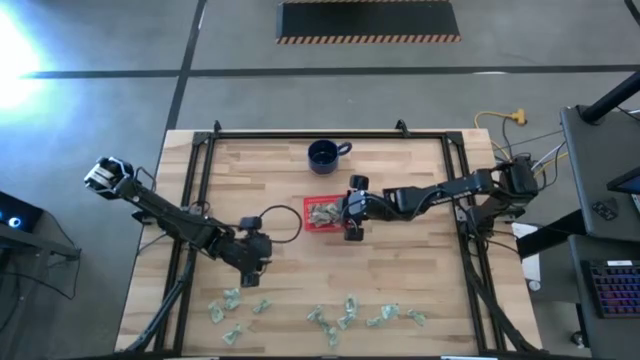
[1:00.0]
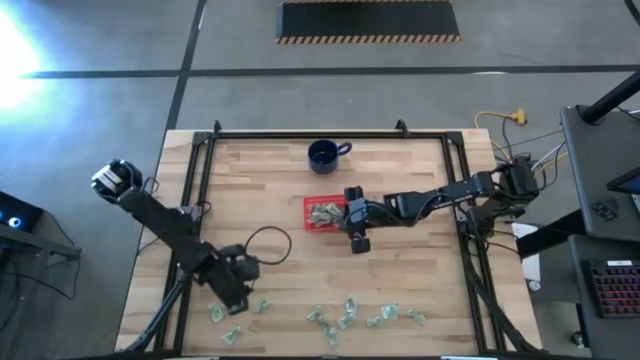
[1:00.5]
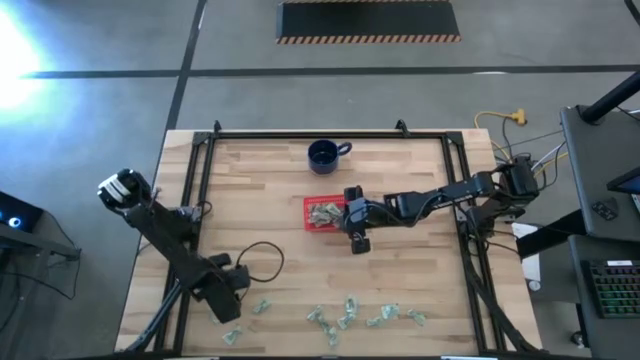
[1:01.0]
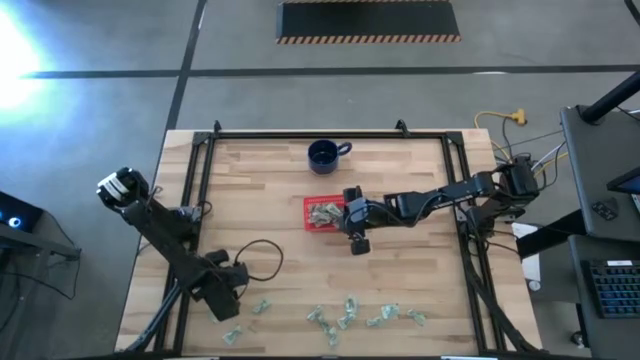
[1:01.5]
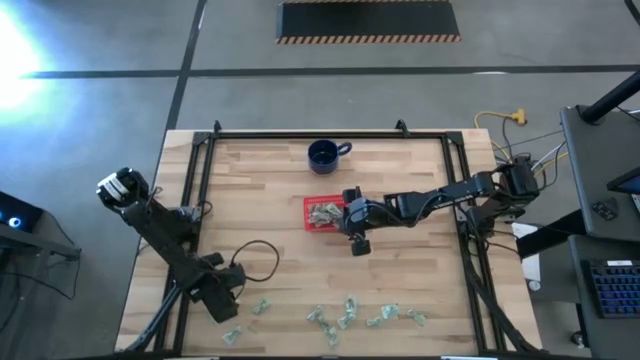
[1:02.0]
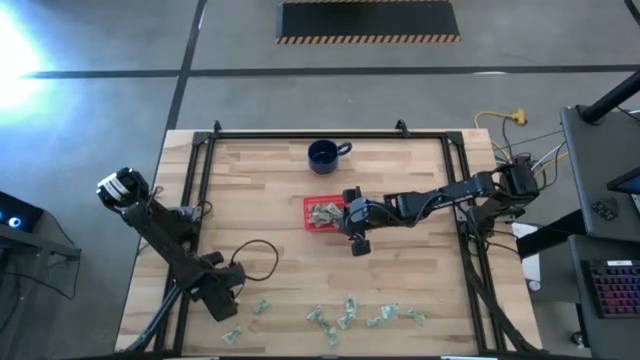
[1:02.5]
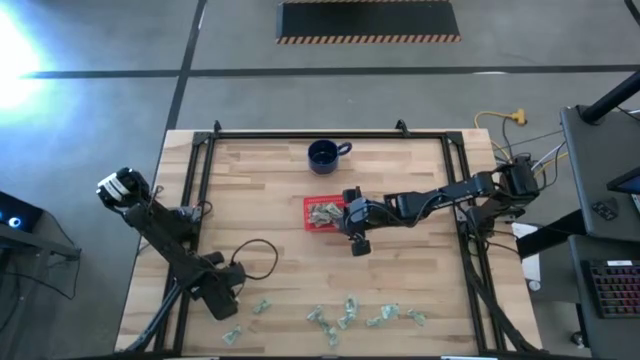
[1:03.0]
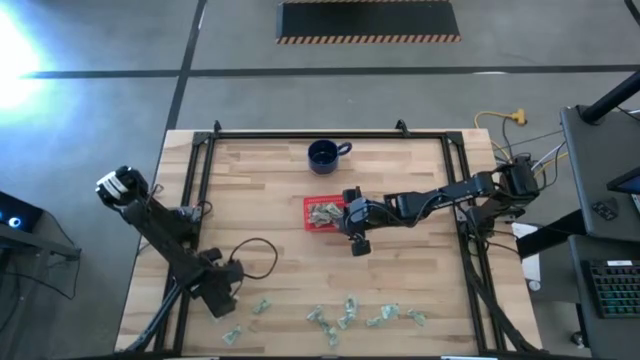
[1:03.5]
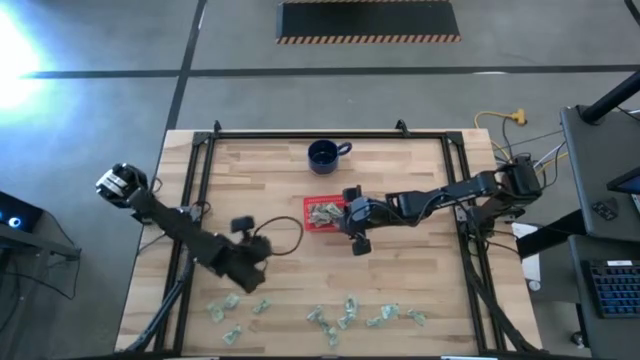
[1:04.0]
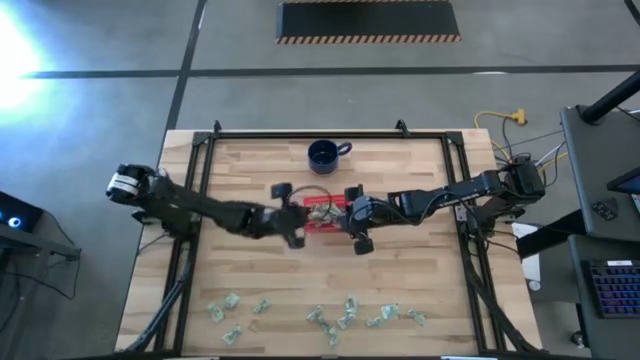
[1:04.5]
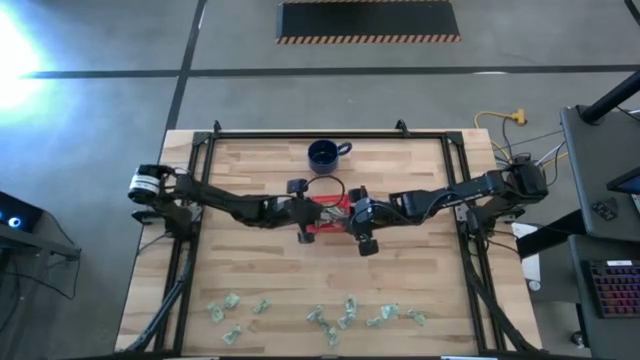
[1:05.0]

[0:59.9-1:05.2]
Task: Pick and place items into bin
Put the stevia packet into the red bin

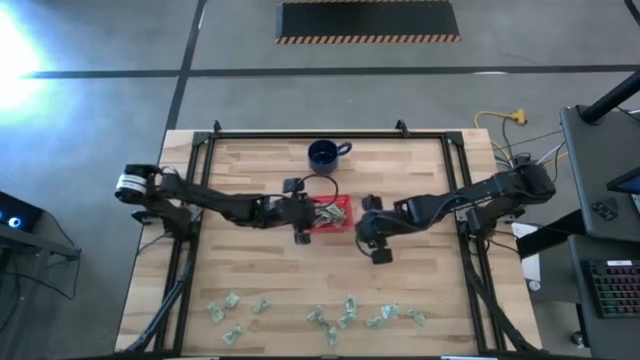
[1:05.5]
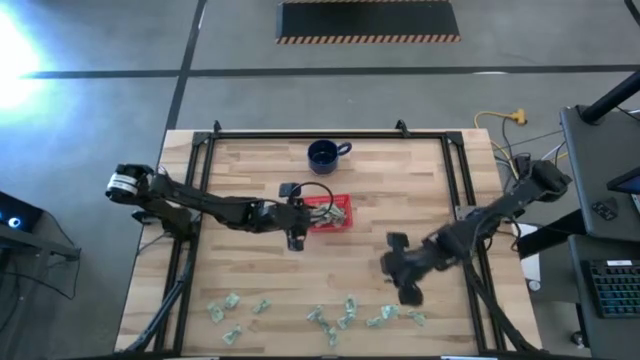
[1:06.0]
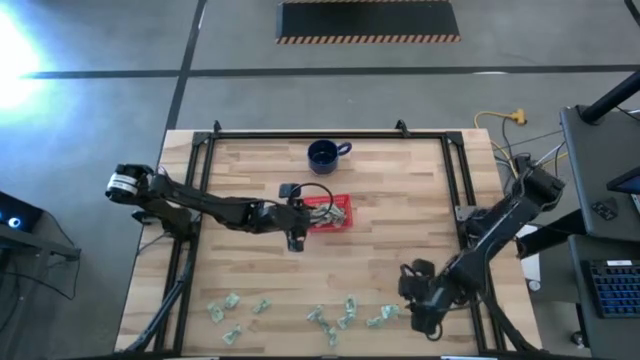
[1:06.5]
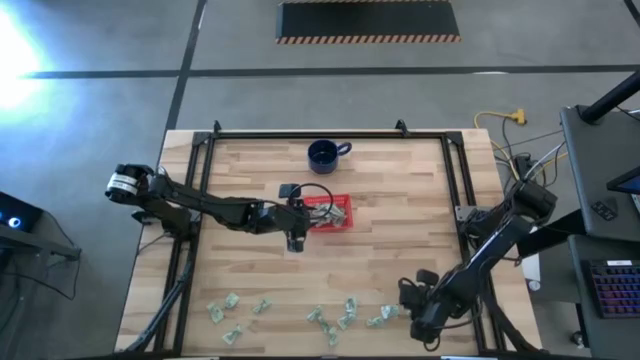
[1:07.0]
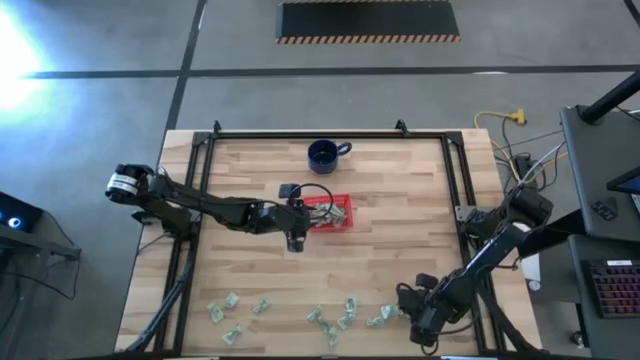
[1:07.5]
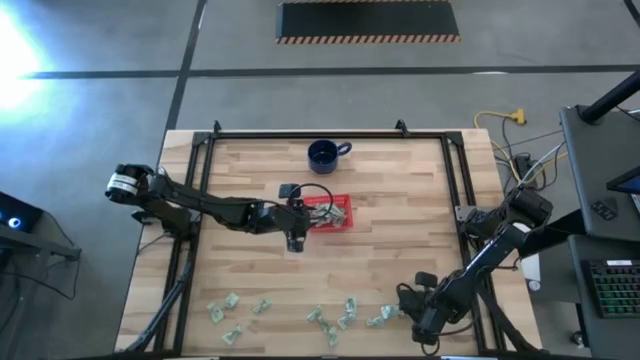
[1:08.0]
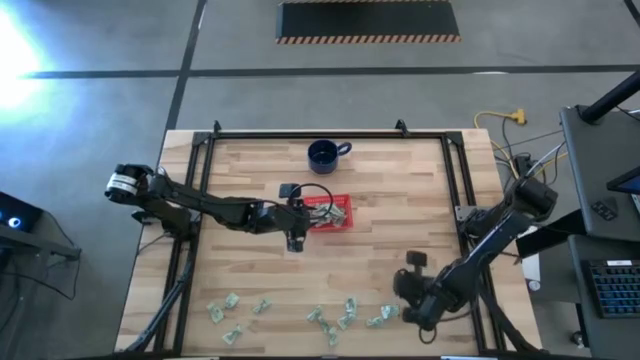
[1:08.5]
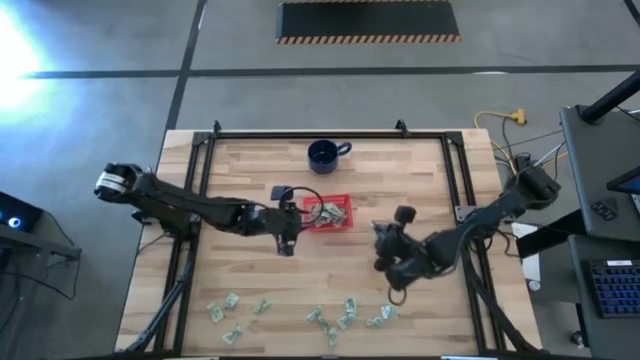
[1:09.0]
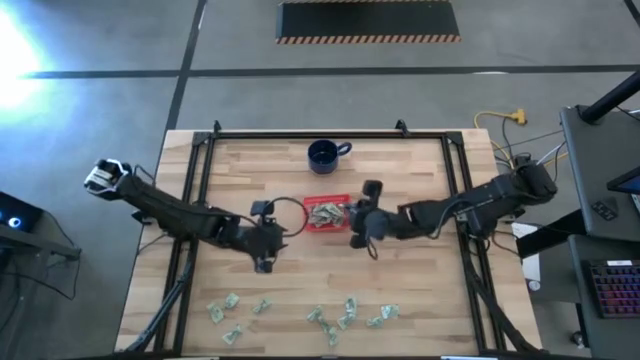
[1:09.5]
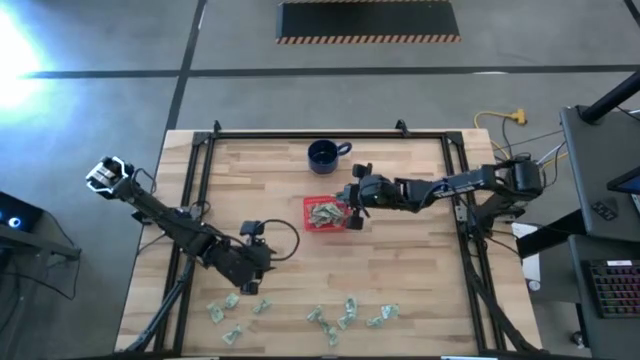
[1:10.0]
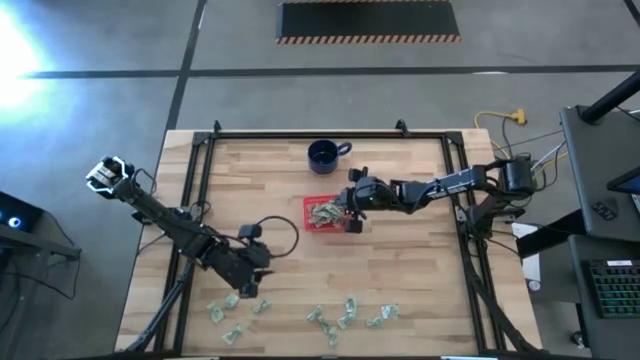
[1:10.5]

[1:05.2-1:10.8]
Put the stevia packet into the red bin

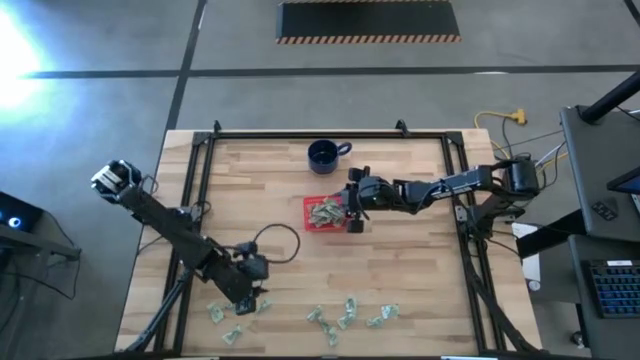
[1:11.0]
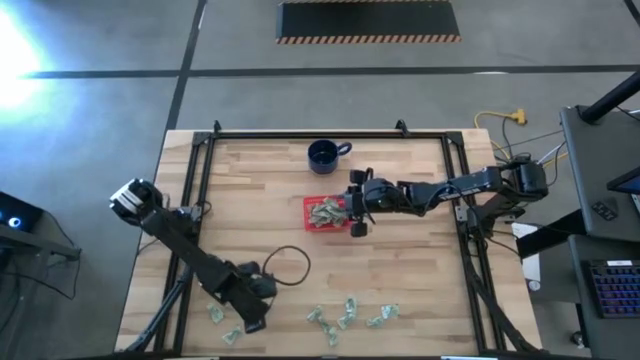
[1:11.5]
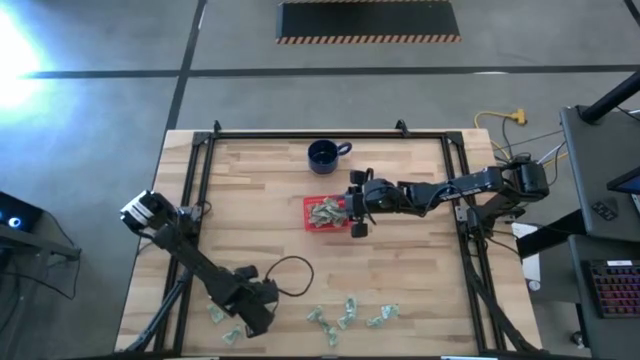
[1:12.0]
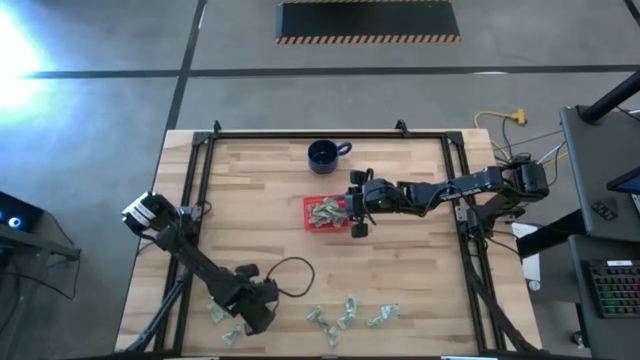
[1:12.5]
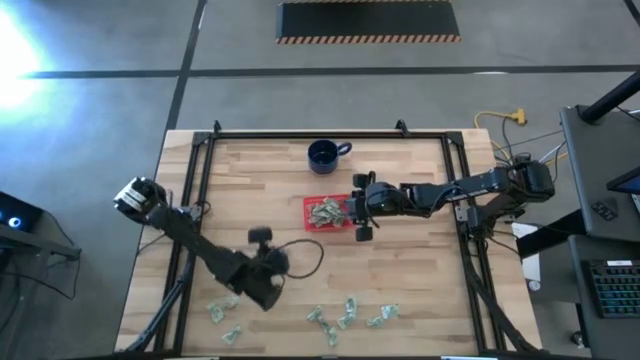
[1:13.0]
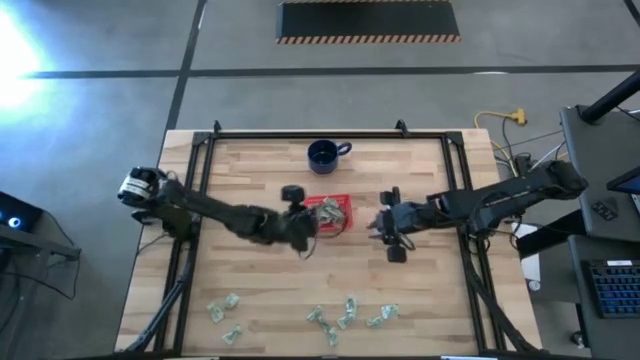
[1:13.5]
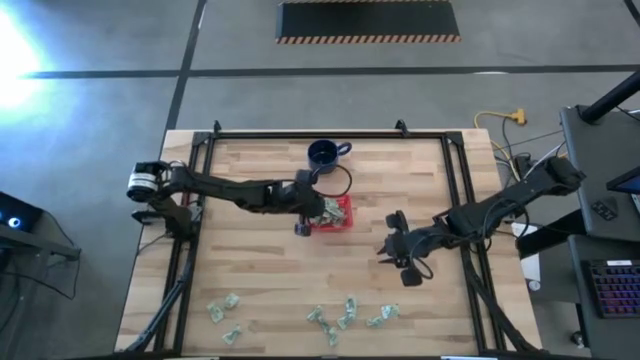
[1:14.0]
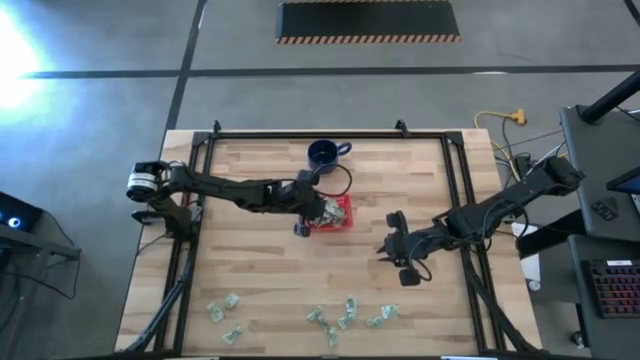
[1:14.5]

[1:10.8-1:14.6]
Put the stevia packet into the red bin

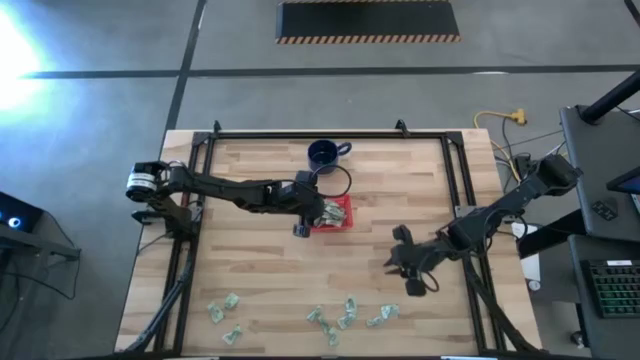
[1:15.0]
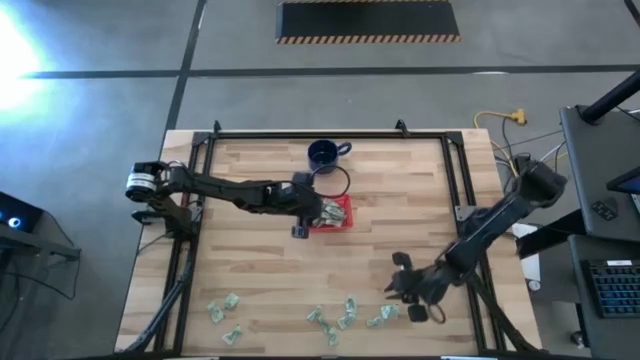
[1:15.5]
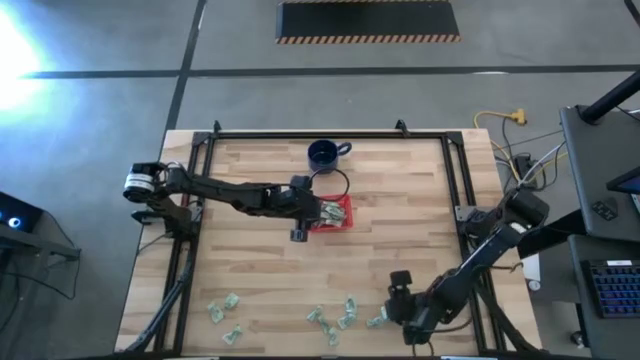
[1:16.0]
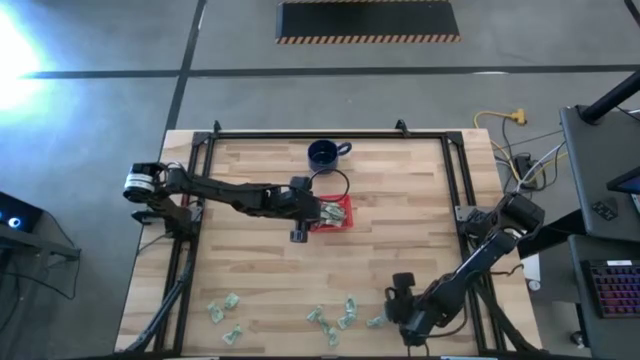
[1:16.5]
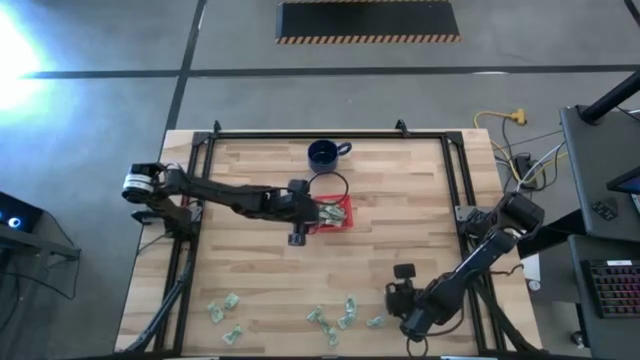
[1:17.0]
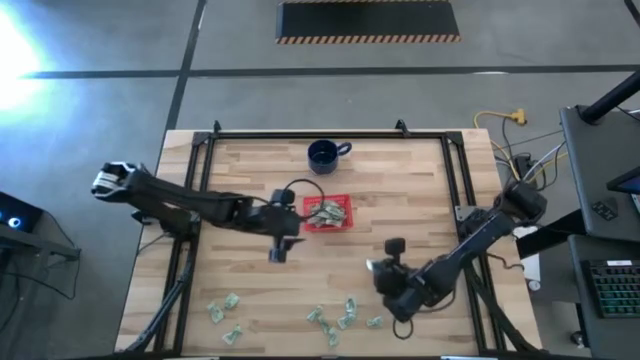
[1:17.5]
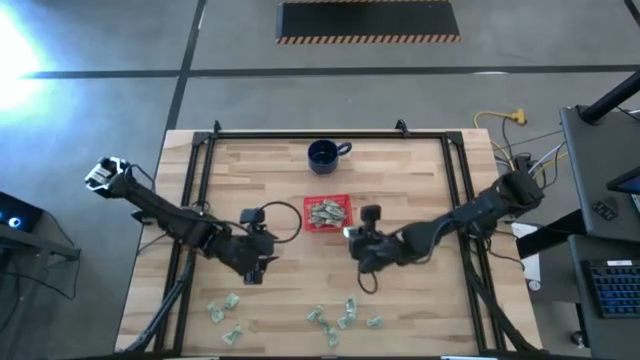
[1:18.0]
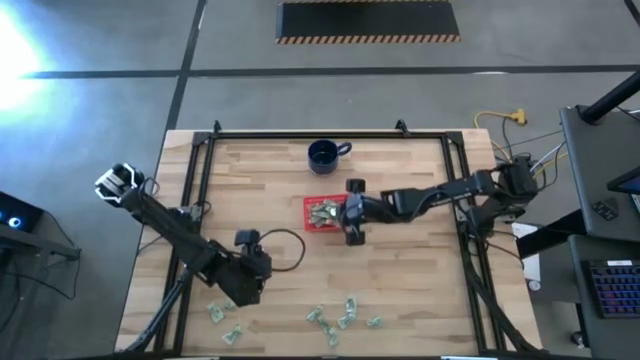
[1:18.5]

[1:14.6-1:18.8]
Put the stevia packet into the red bin

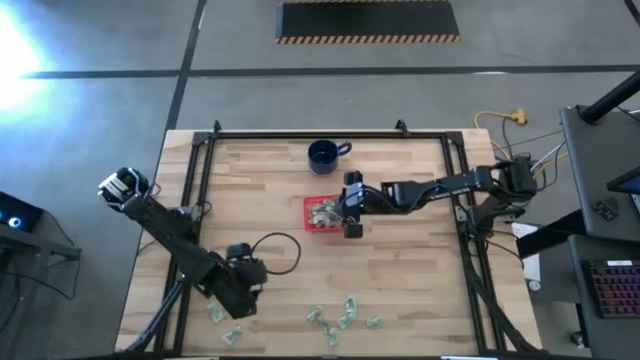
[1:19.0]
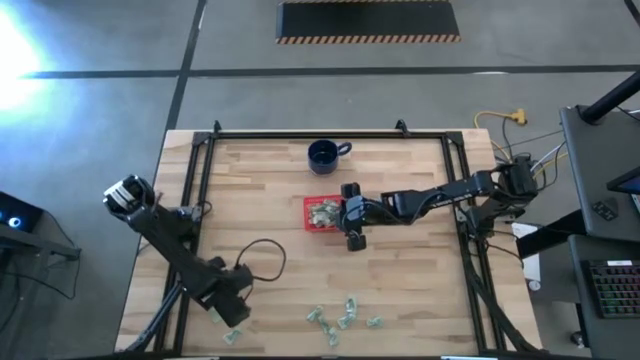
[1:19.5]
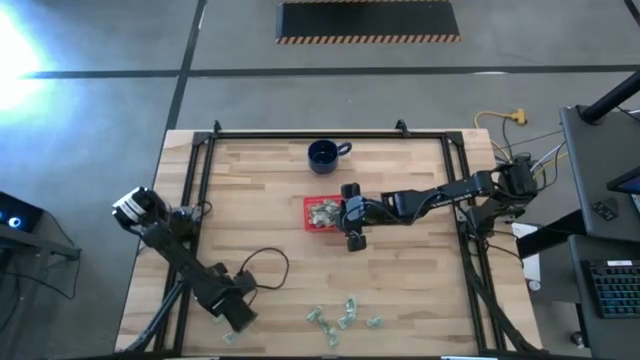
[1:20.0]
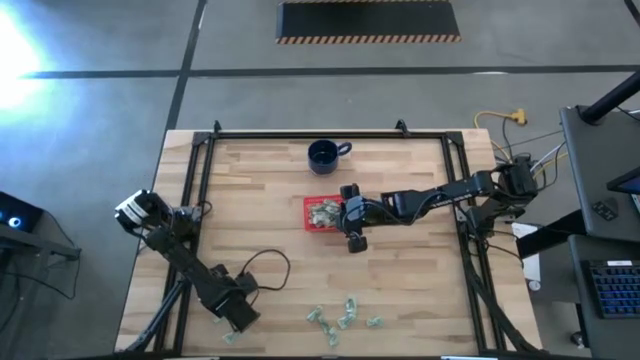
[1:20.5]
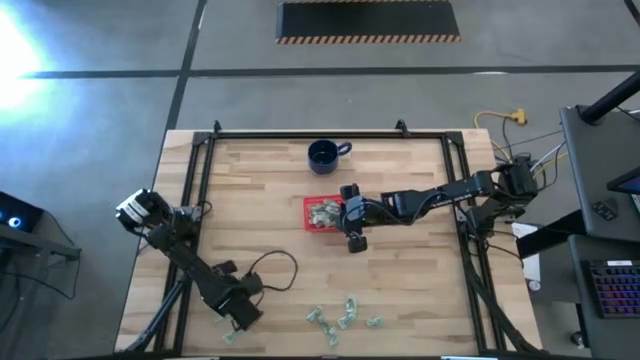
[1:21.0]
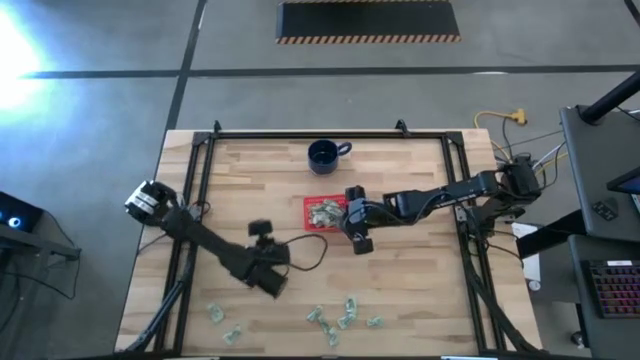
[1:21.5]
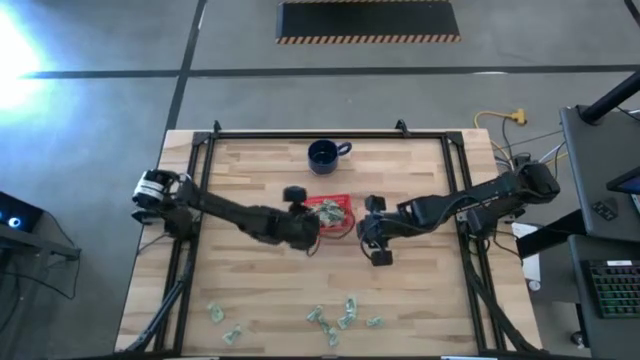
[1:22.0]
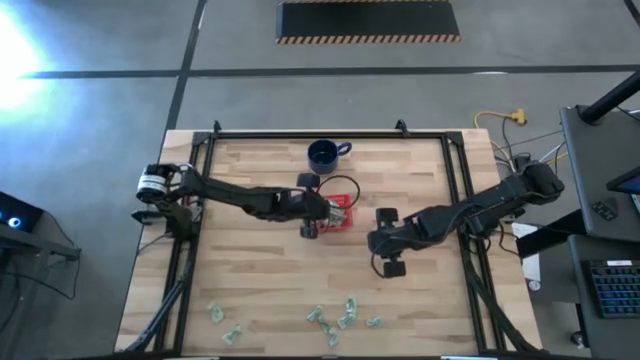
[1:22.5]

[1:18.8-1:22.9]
Put the stevia packet into the red bin
